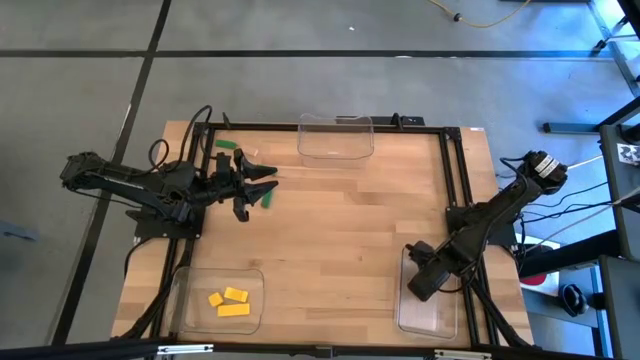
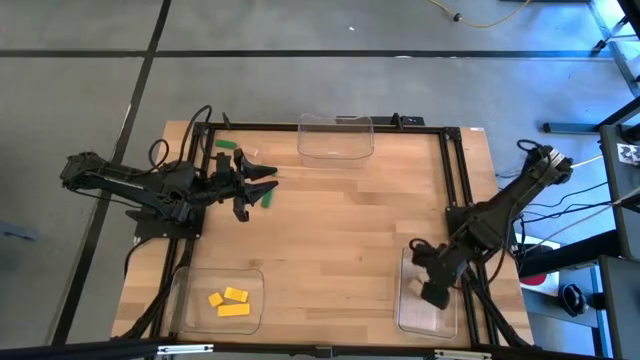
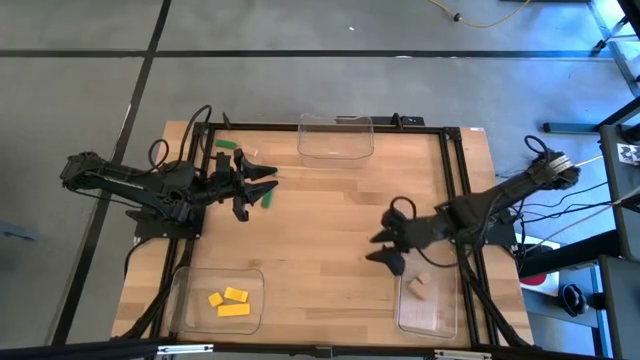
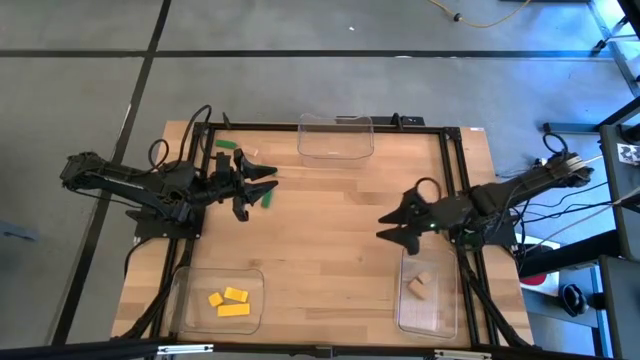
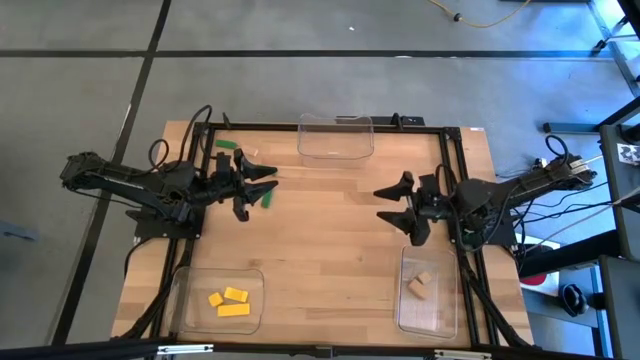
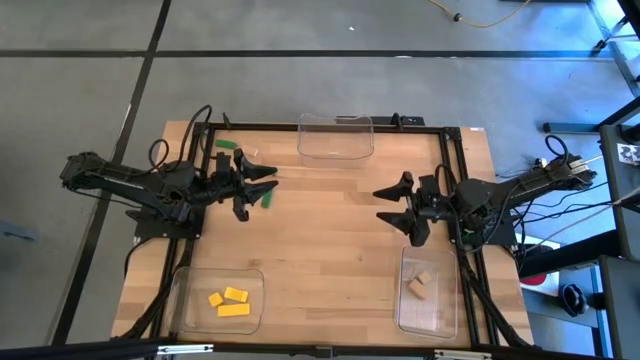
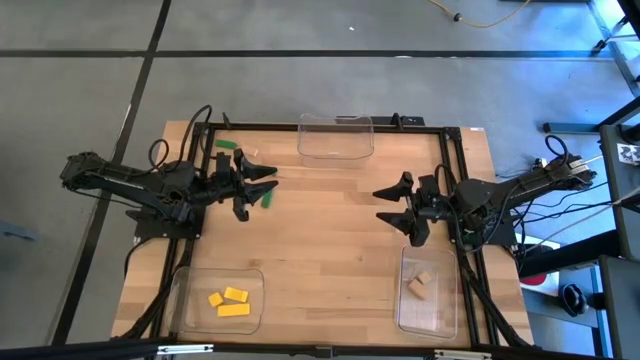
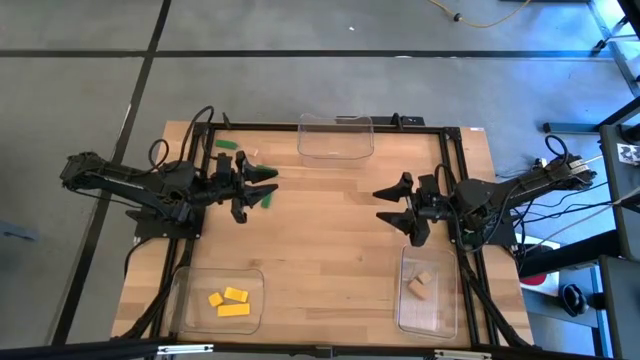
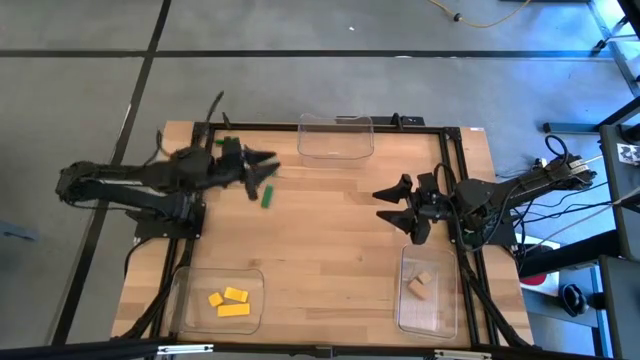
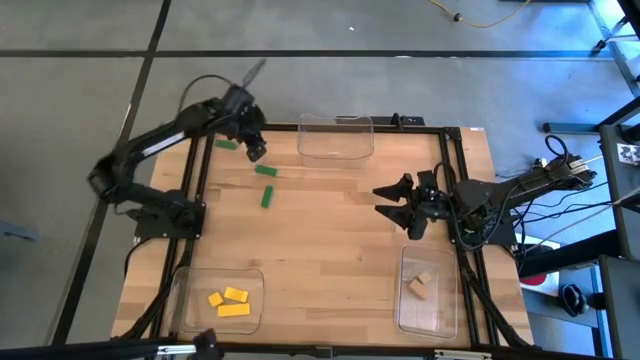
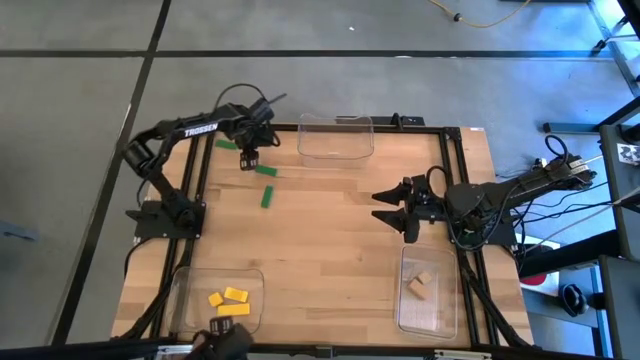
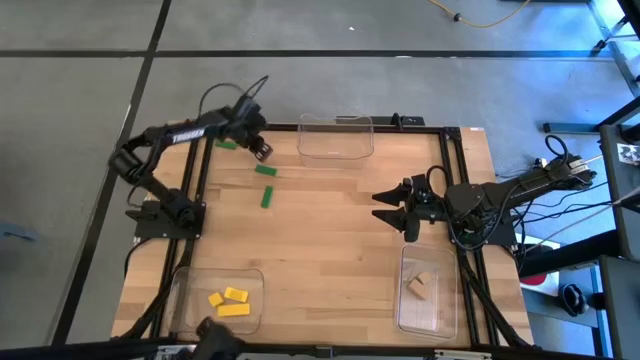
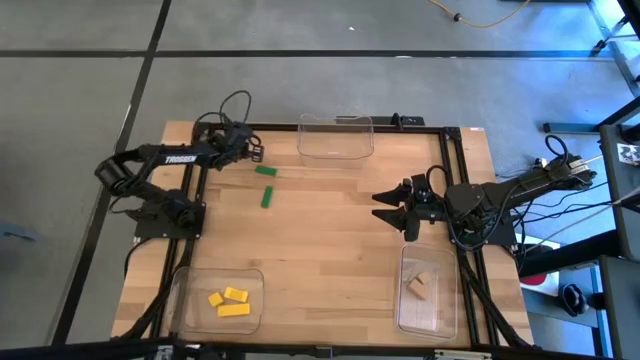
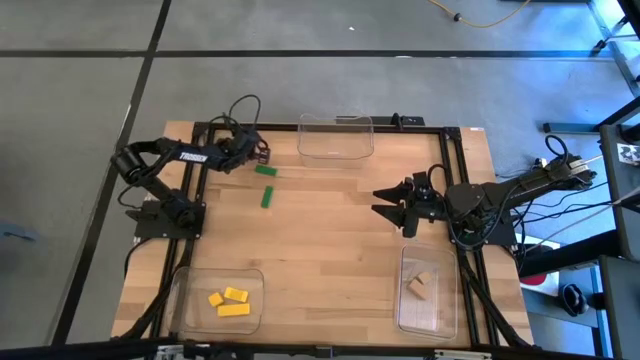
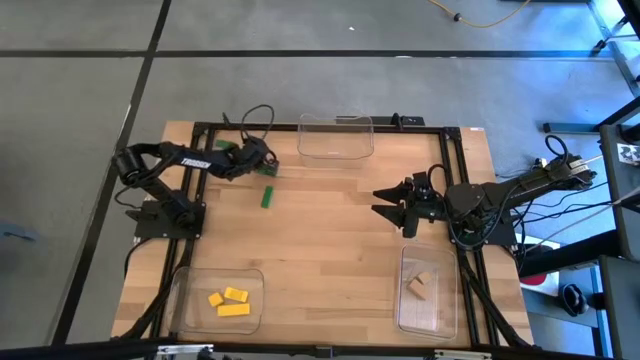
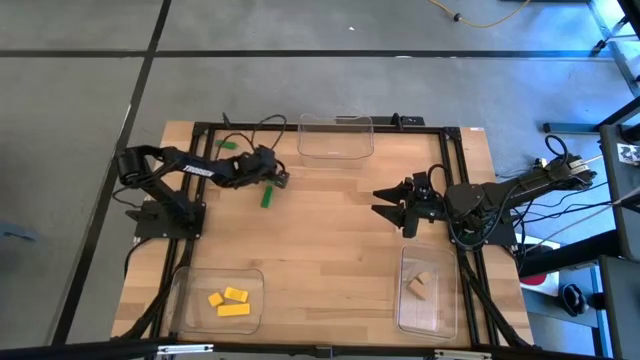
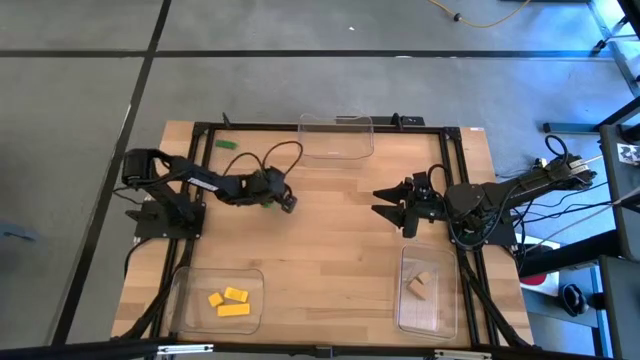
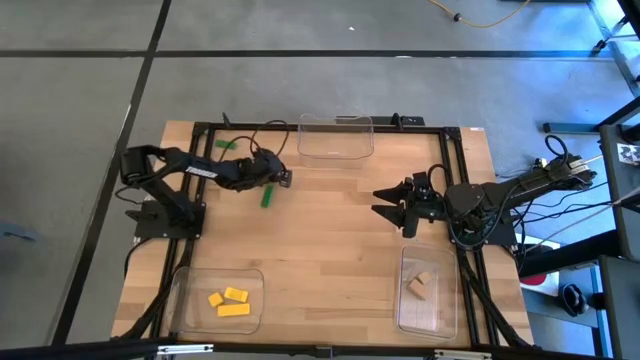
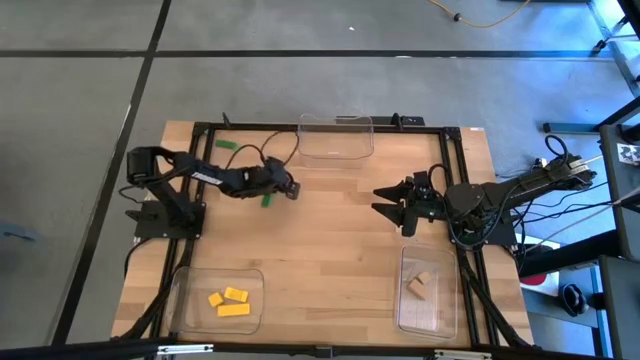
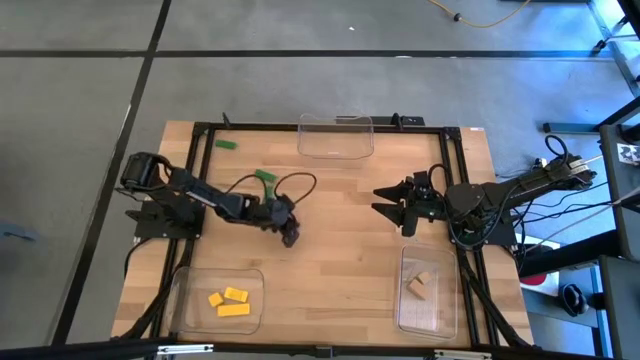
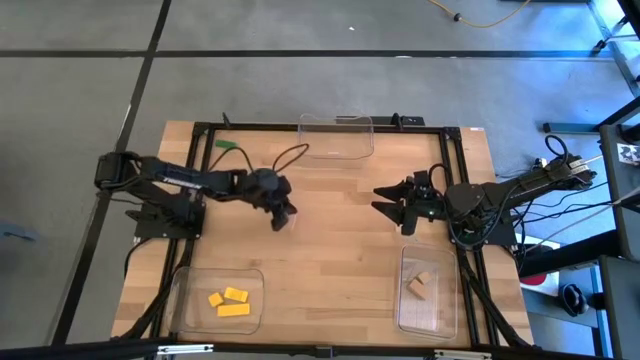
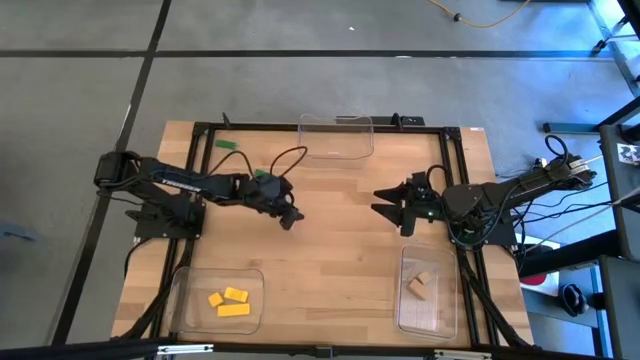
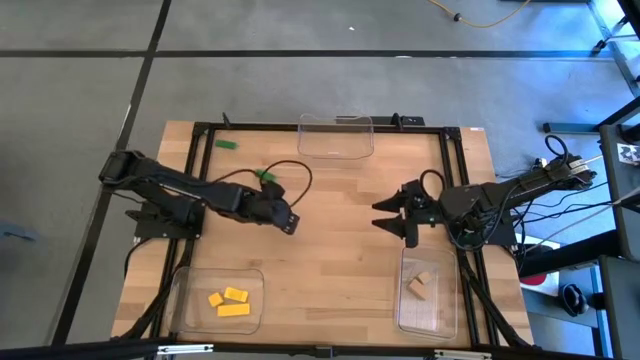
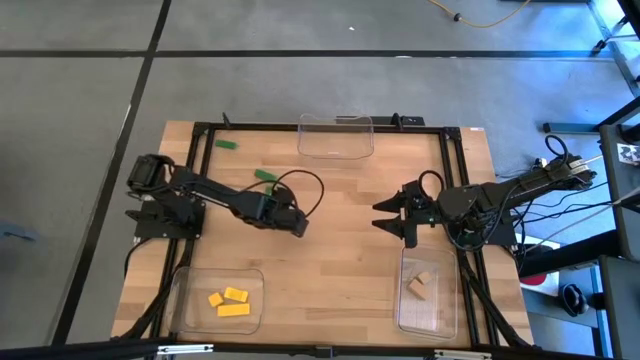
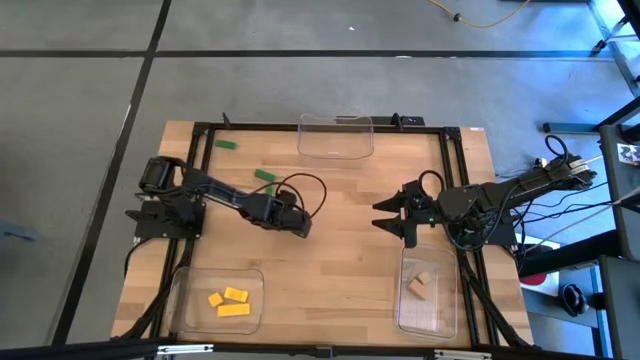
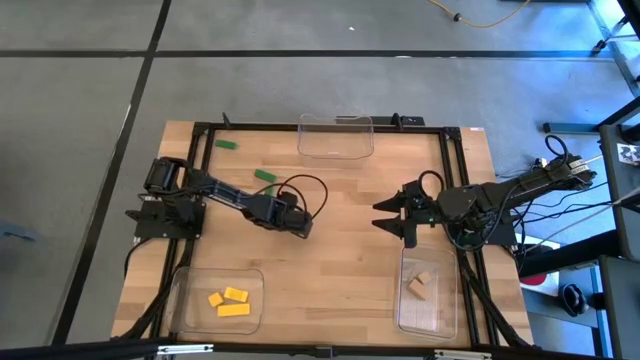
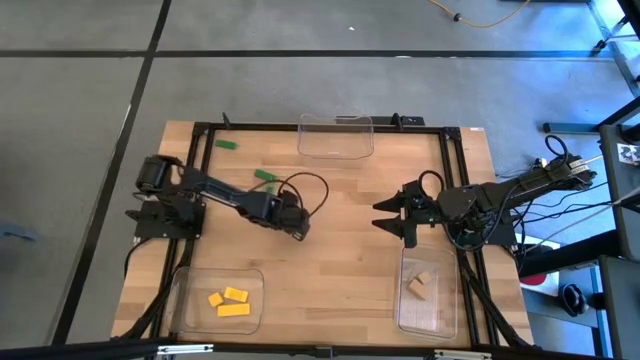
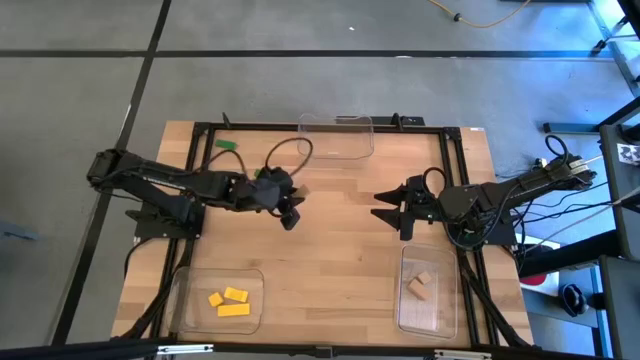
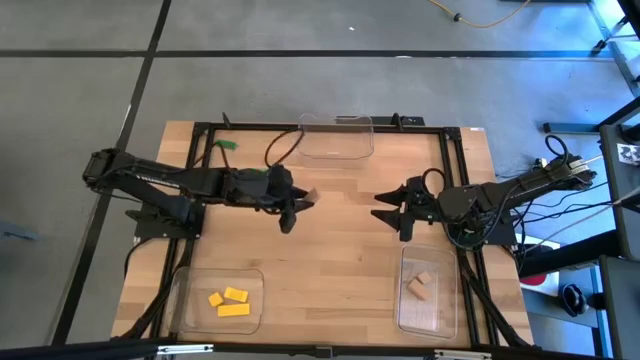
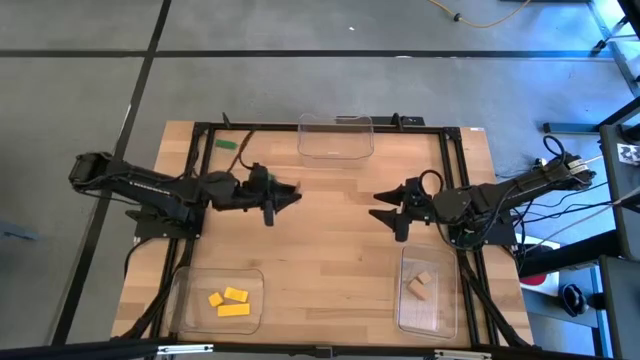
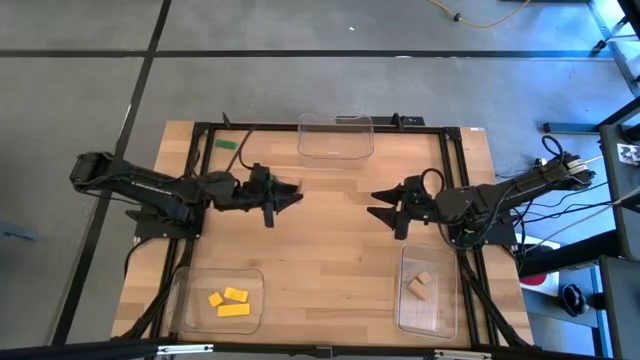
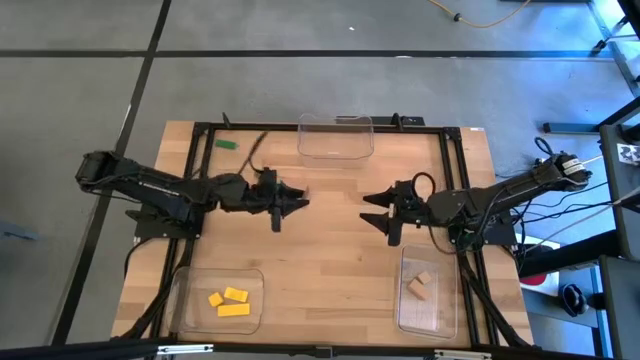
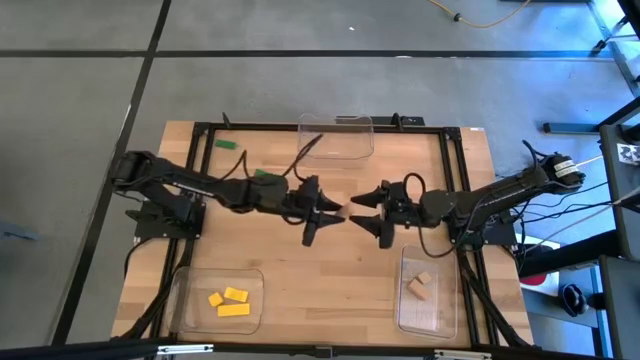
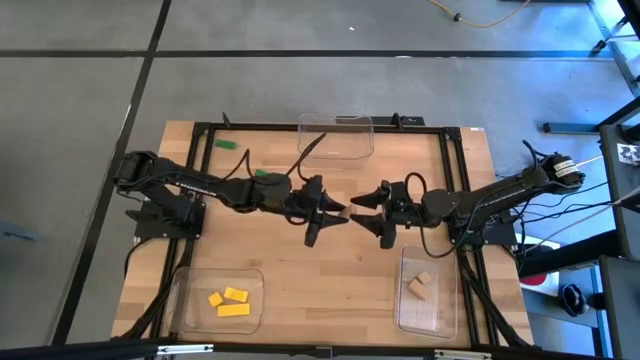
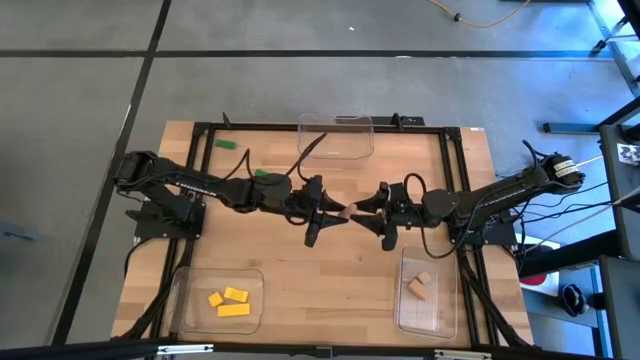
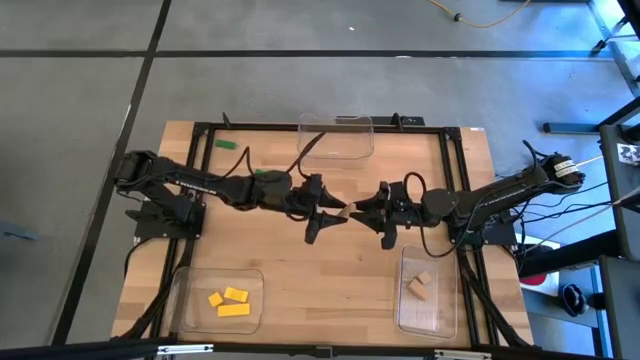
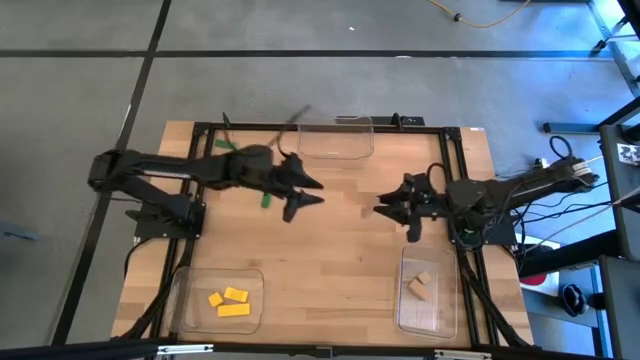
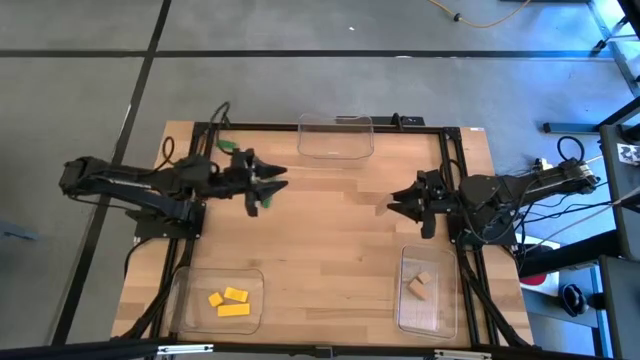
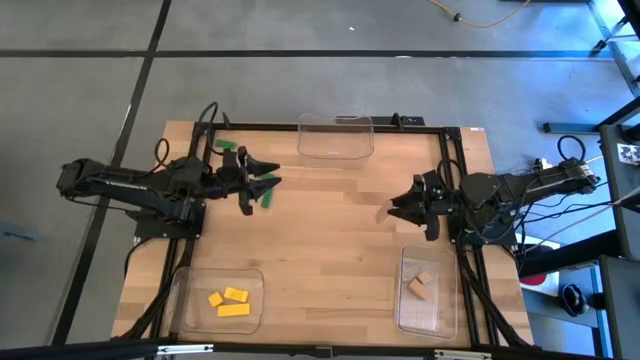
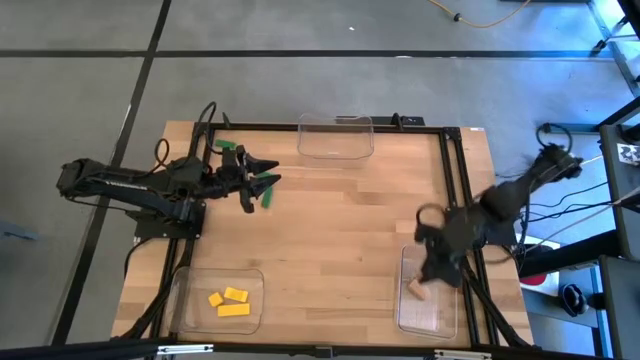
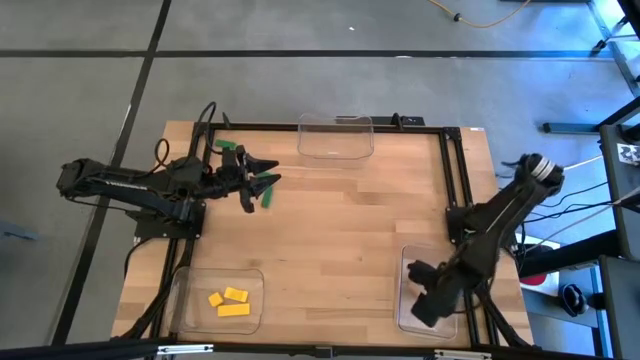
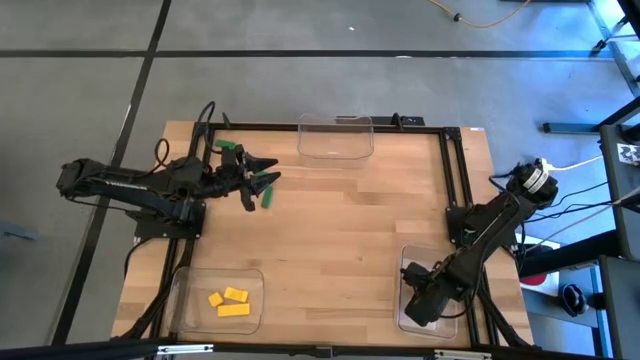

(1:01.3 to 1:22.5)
Task: Sort & place blocks by color
Put the light brown block into bottom right transparent the bin
